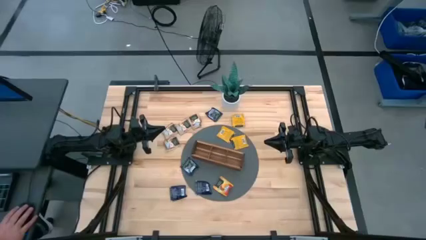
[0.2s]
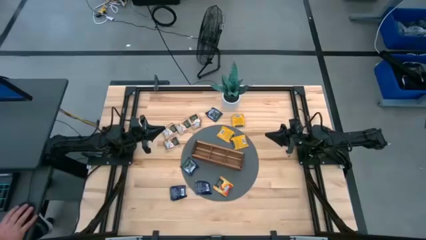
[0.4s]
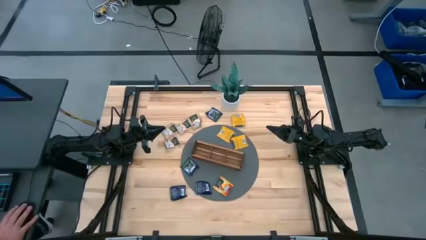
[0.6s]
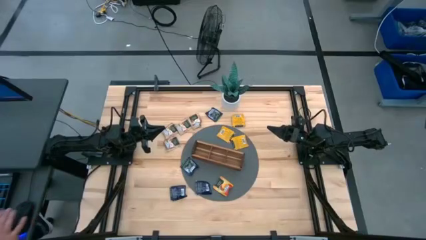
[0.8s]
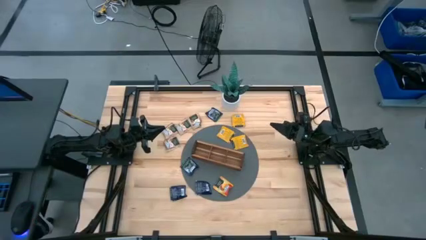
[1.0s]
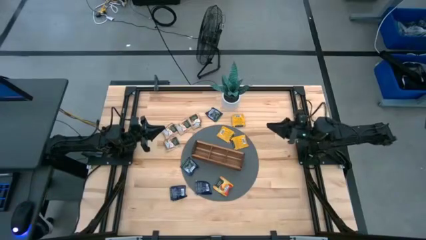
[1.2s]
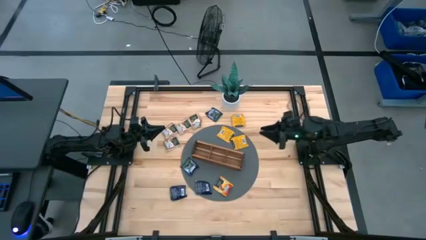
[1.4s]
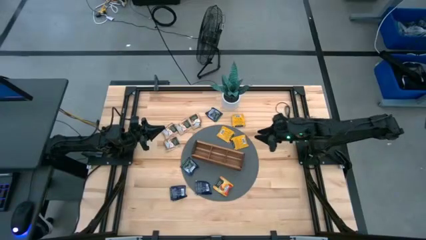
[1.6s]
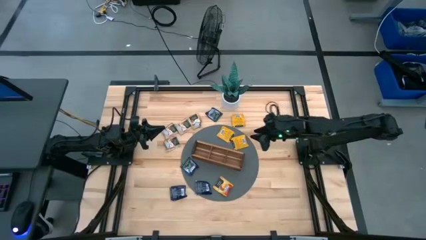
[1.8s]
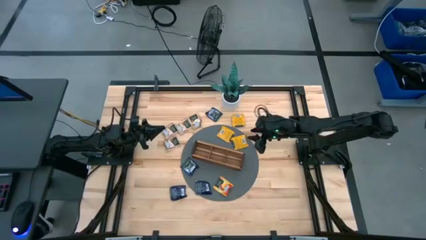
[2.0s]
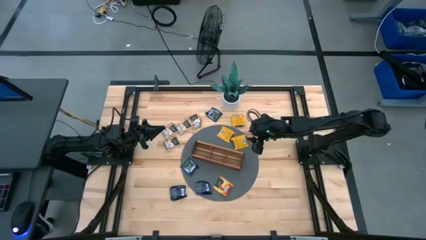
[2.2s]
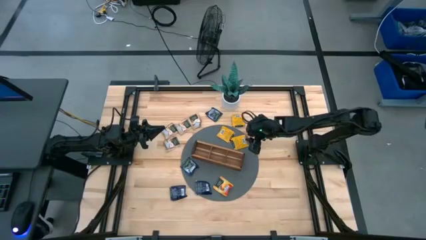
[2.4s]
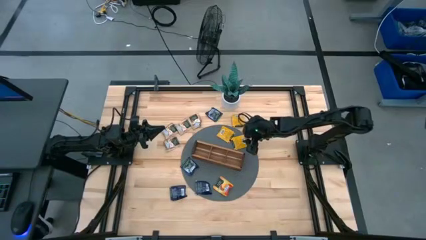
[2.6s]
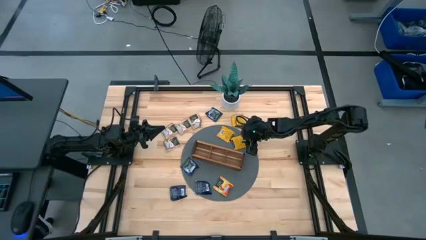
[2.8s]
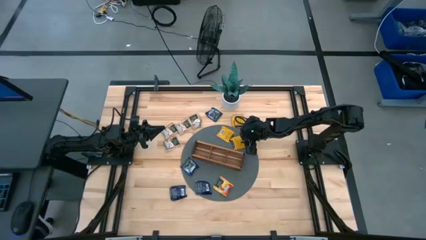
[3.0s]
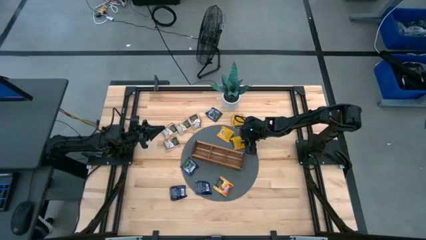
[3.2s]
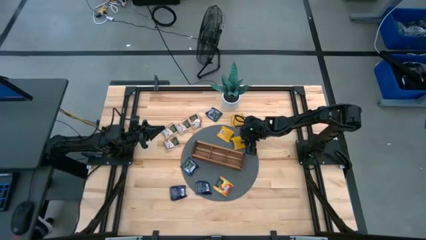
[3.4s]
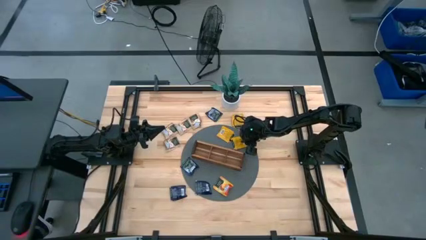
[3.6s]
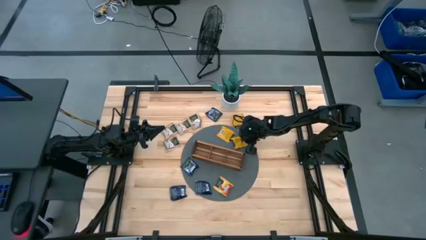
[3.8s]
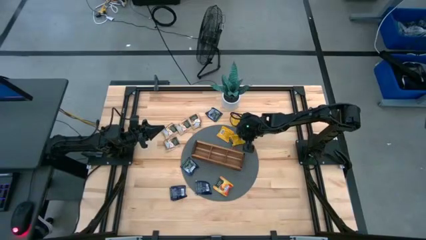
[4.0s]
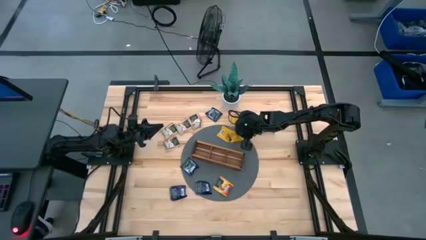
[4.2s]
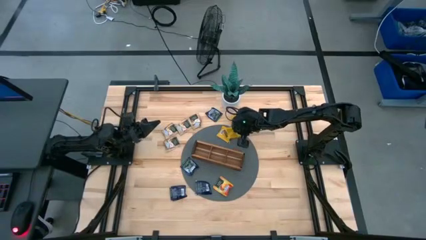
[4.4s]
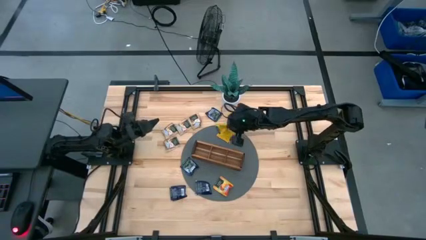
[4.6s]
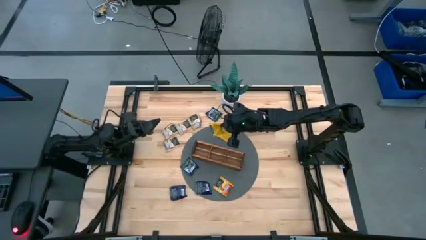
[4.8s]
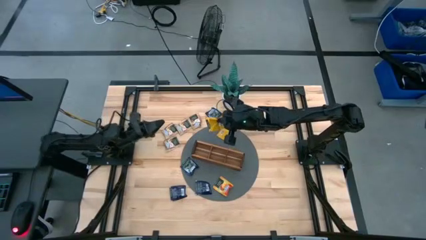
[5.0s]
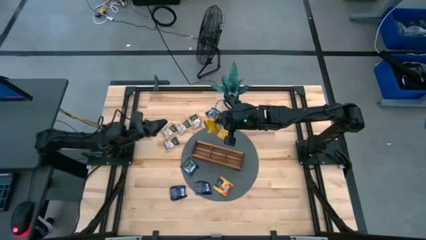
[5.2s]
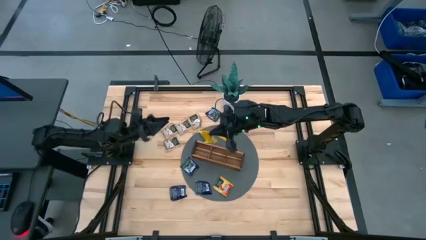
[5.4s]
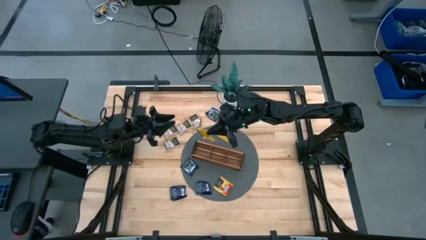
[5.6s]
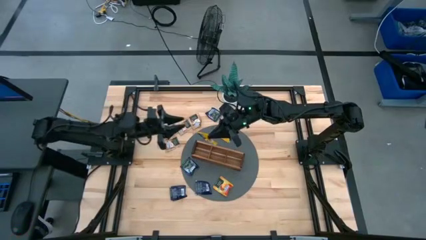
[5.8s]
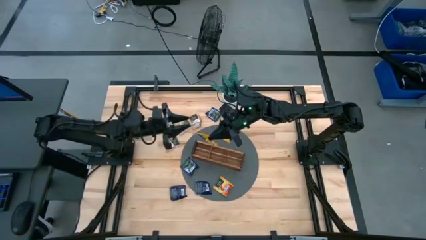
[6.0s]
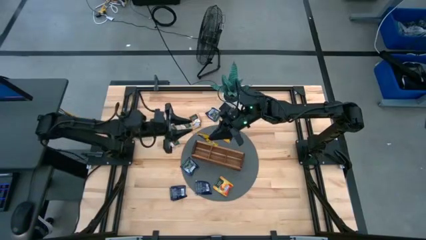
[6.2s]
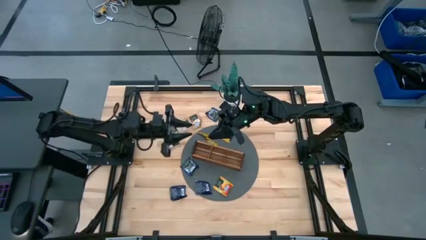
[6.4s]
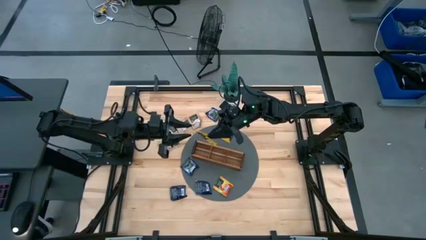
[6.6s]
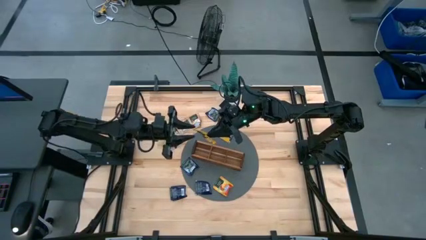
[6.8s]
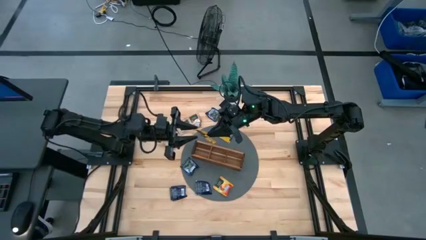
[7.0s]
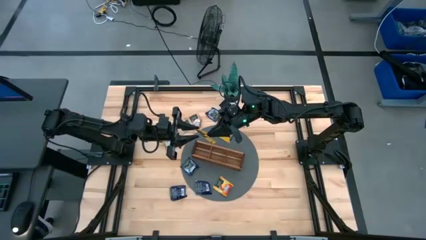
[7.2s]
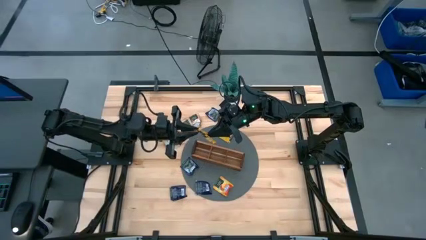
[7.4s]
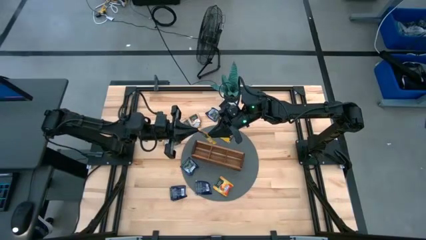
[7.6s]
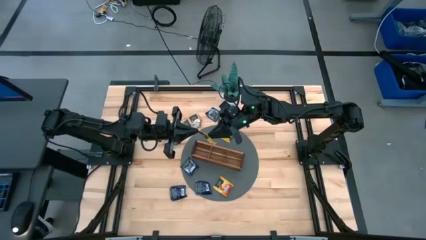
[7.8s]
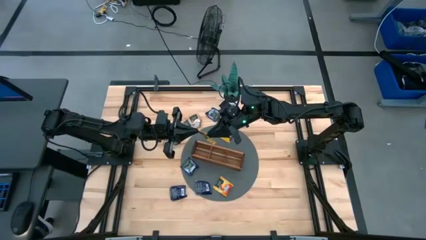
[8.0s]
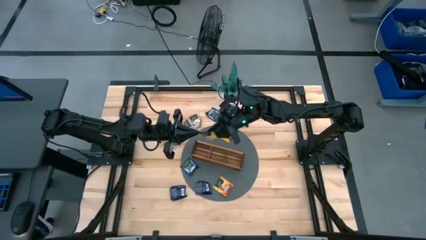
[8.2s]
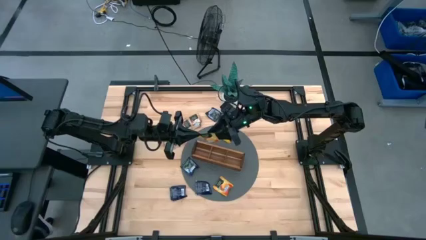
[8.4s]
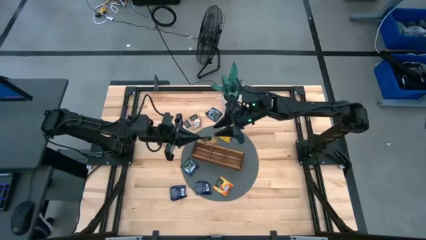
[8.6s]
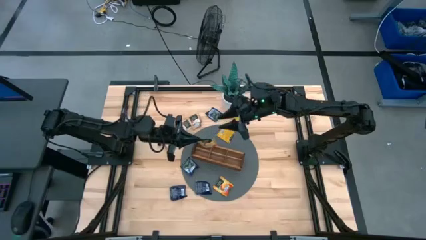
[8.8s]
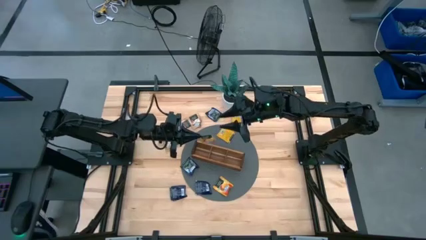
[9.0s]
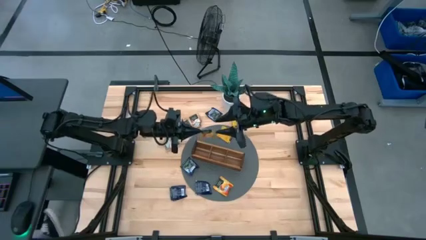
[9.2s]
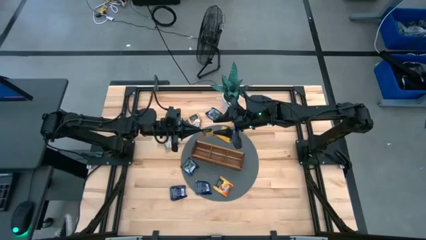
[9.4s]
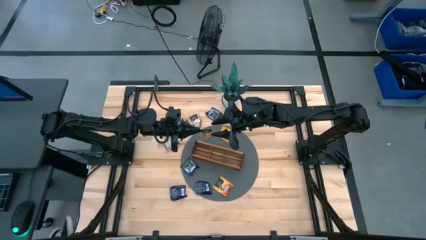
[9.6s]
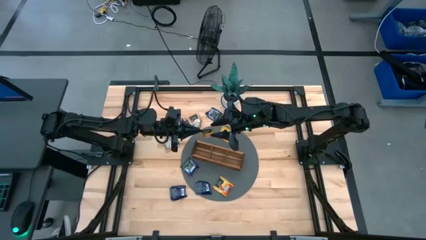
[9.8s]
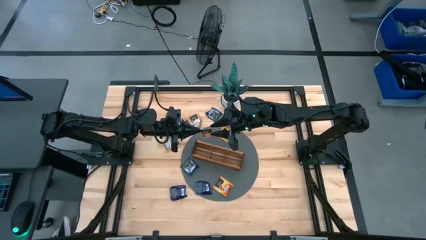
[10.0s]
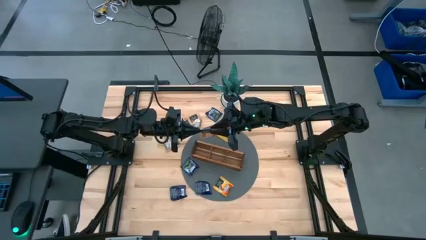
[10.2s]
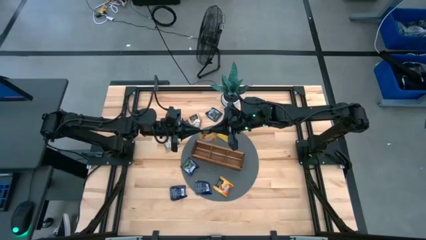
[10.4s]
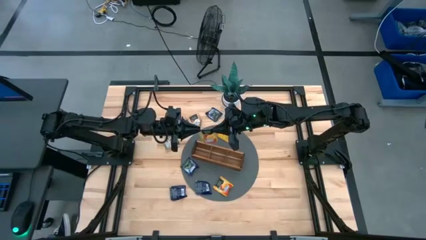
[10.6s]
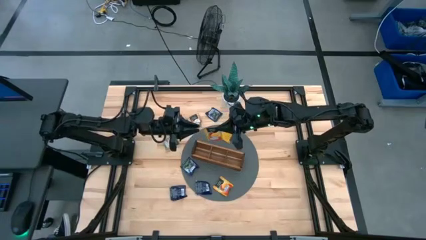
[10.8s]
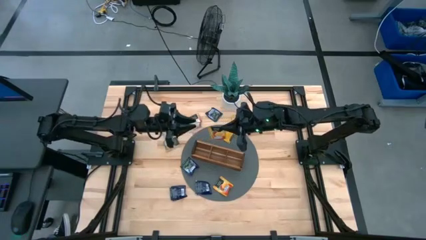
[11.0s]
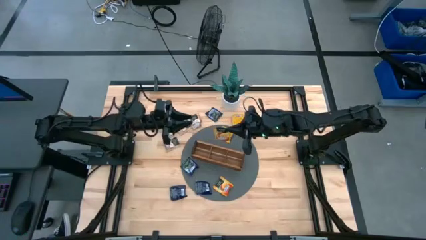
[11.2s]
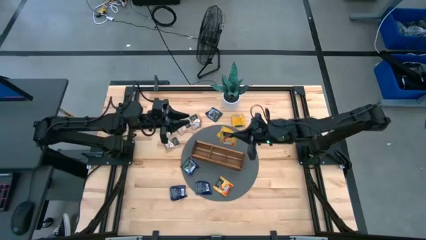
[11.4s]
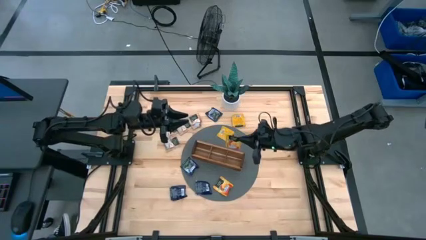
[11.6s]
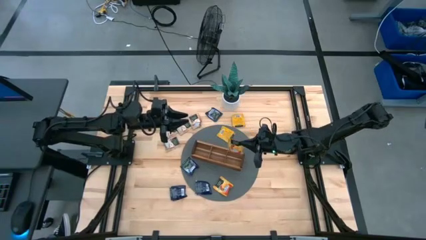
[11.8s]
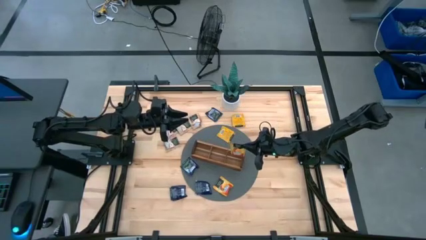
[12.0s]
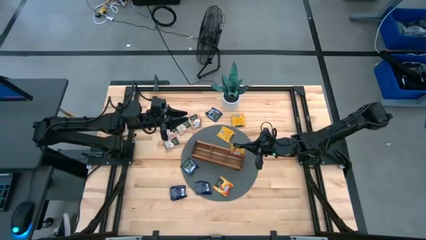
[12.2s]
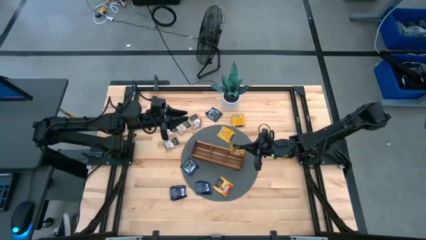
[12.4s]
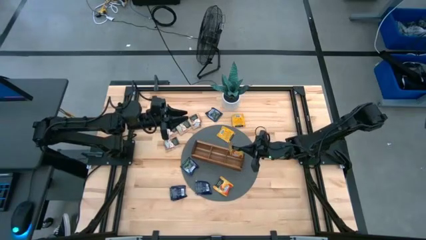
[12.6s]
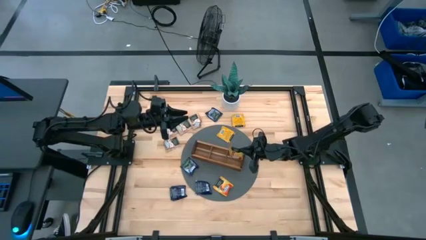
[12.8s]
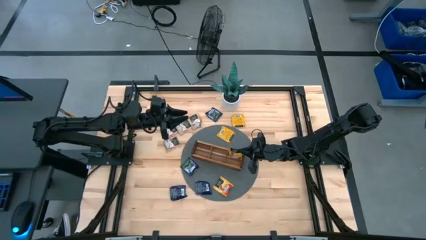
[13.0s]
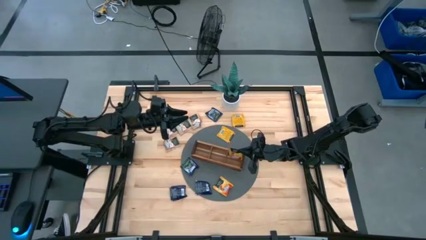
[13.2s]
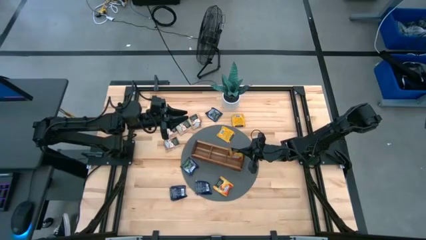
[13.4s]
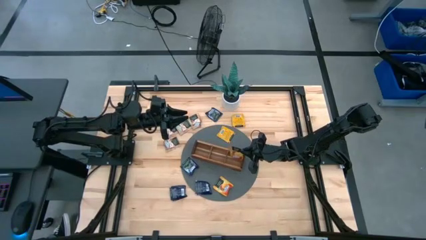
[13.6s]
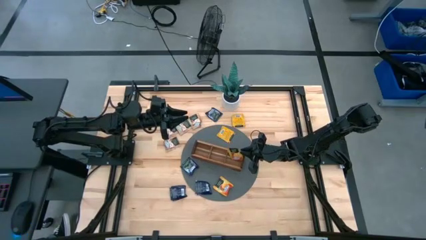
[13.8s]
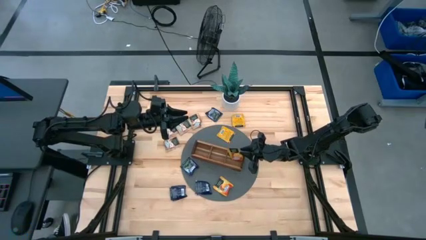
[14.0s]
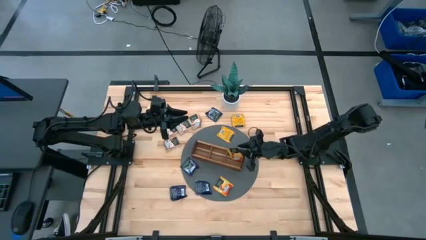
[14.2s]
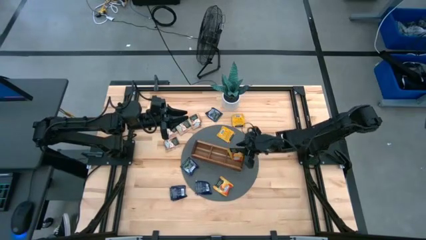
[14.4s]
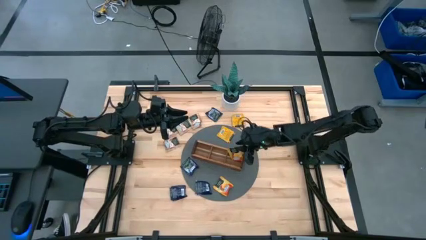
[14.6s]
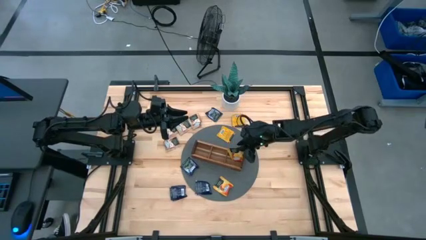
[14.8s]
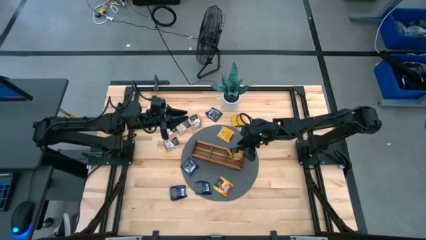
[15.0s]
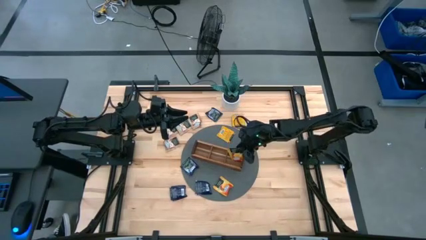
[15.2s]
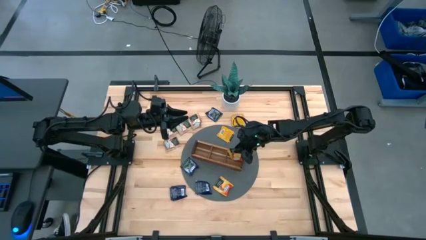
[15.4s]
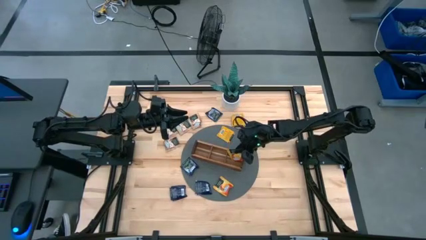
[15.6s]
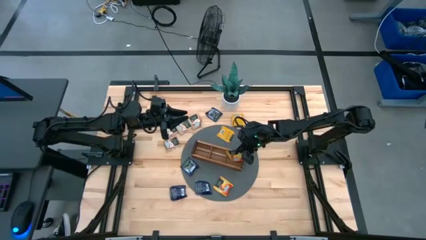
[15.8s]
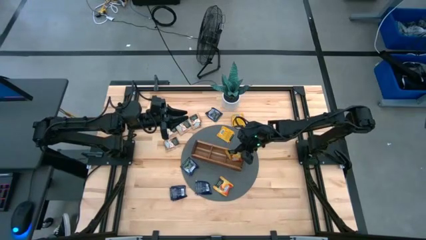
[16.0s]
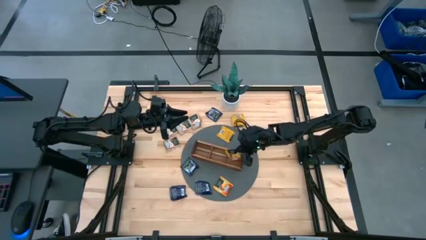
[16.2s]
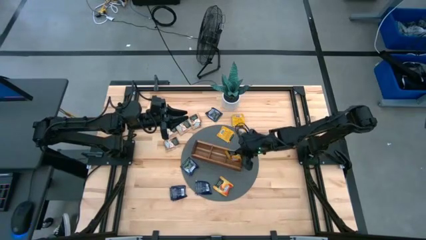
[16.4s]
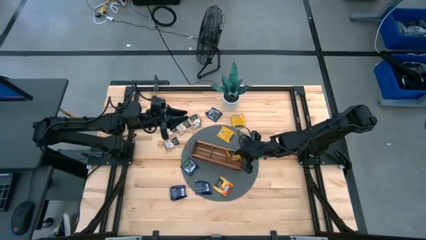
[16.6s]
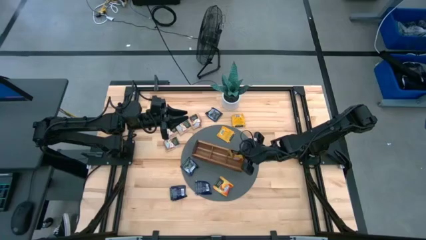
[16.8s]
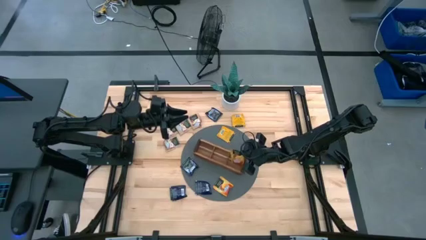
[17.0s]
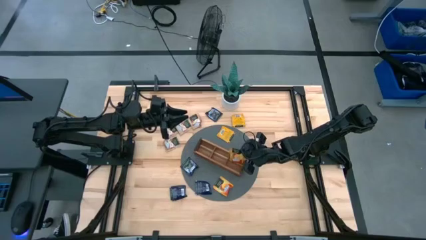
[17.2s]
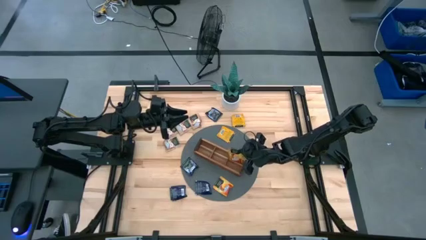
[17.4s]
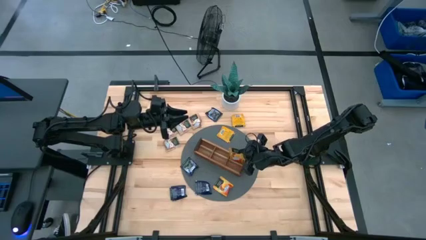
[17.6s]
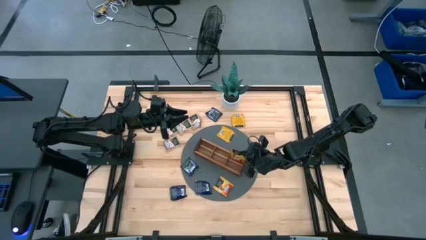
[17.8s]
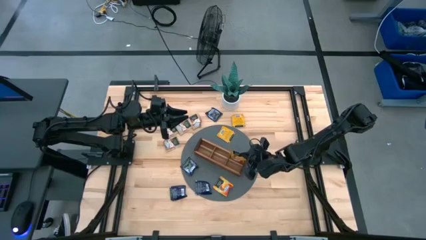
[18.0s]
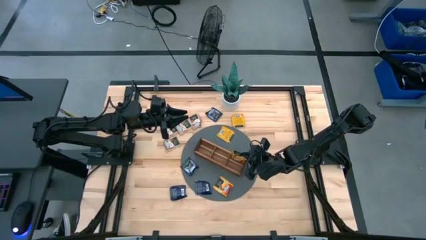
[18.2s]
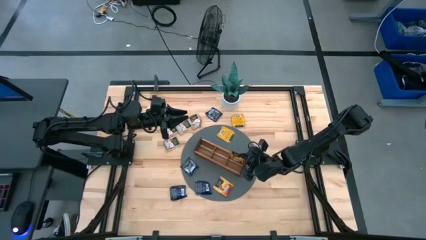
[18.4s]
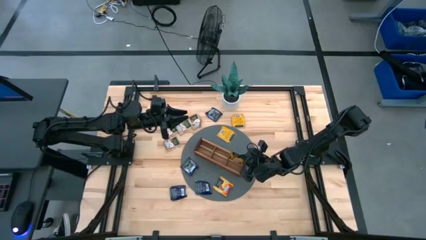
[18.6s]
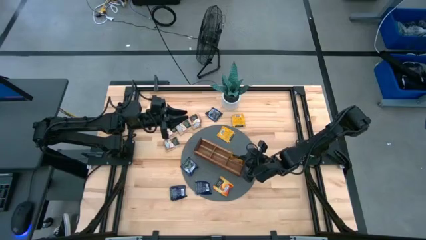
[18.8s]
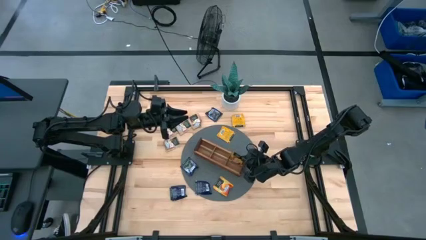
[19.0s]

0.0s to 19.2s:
Task: Pick & Place Tea
Put the yellow tea bag into the right section of the wooden organizer
